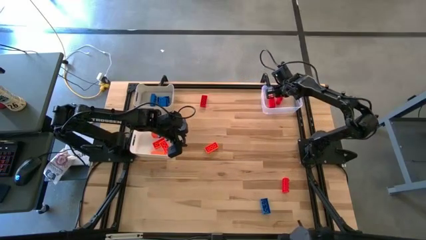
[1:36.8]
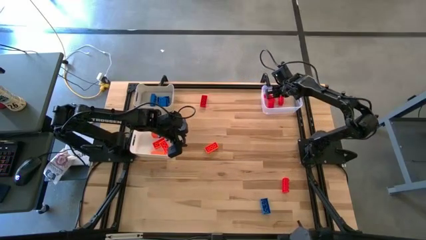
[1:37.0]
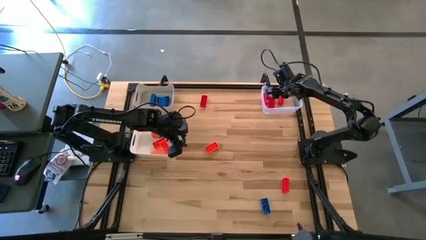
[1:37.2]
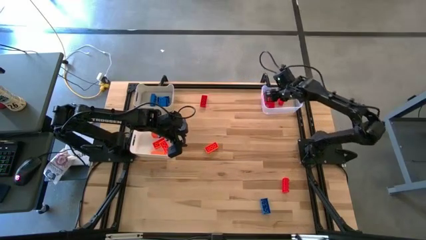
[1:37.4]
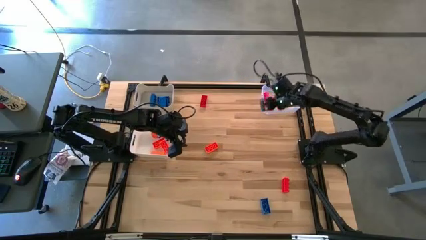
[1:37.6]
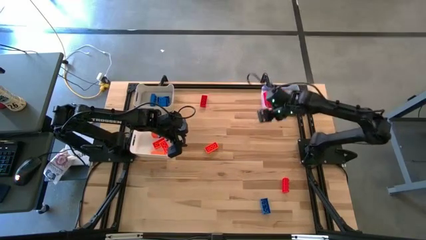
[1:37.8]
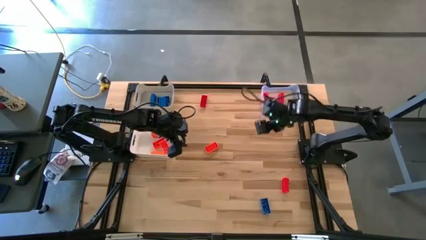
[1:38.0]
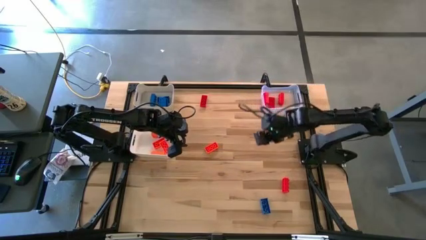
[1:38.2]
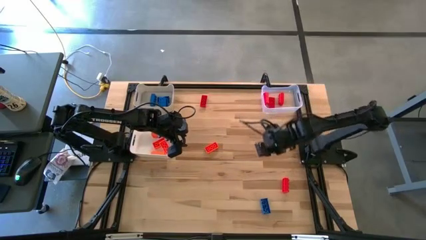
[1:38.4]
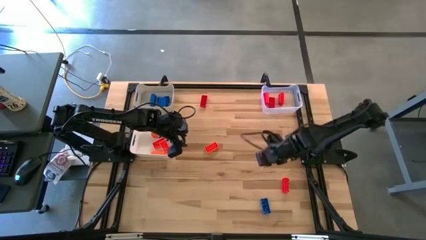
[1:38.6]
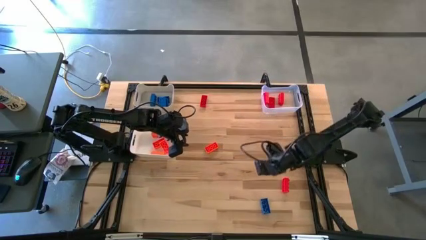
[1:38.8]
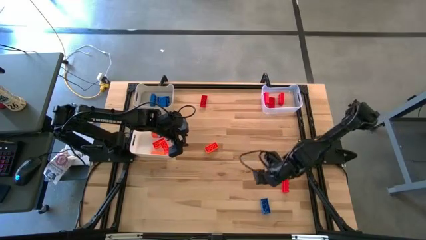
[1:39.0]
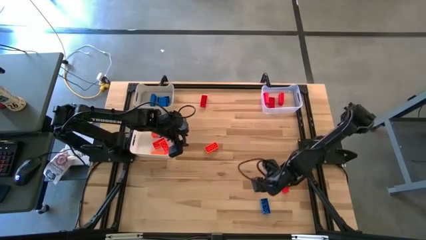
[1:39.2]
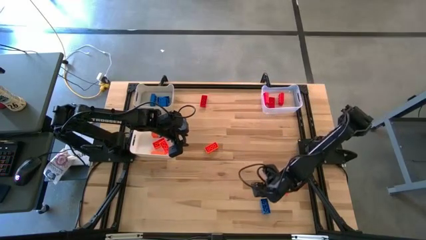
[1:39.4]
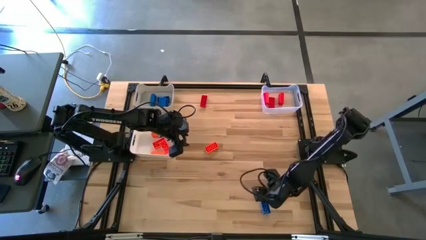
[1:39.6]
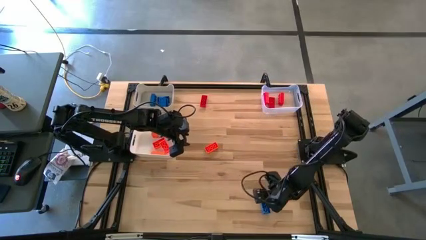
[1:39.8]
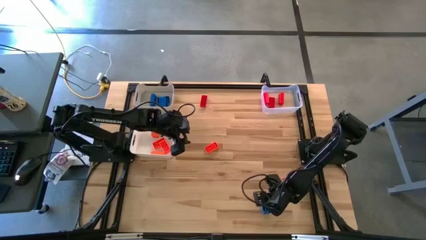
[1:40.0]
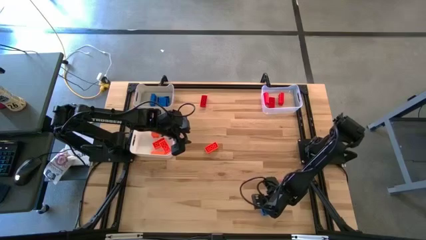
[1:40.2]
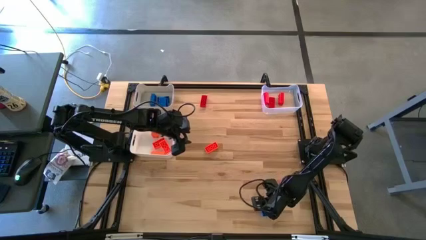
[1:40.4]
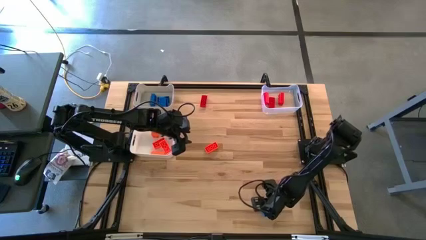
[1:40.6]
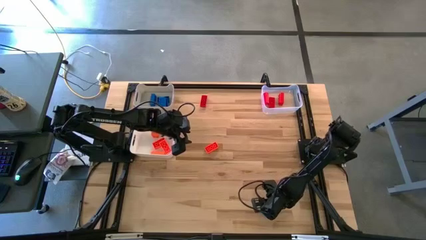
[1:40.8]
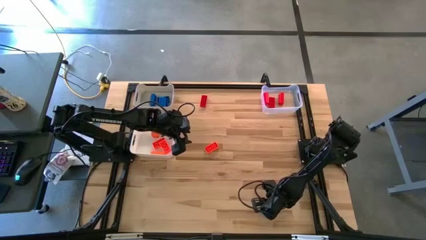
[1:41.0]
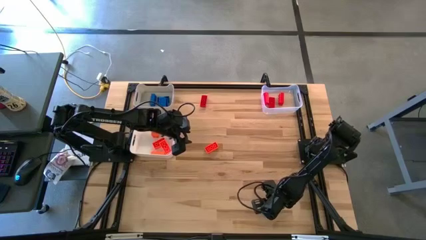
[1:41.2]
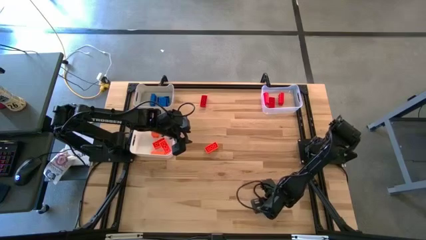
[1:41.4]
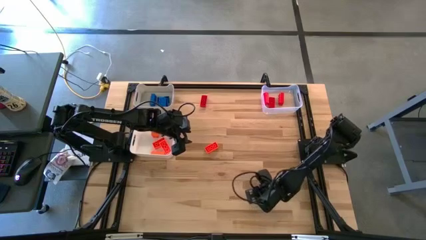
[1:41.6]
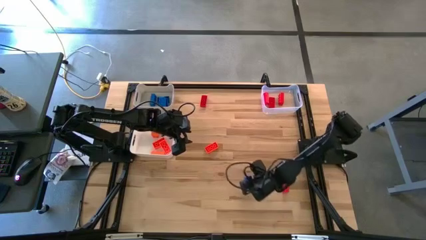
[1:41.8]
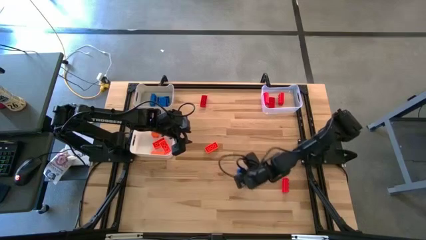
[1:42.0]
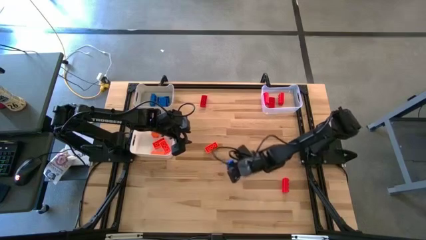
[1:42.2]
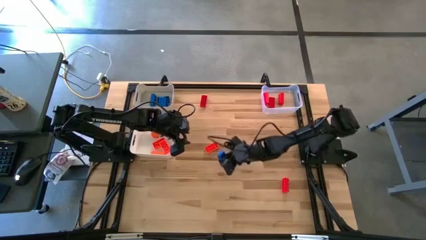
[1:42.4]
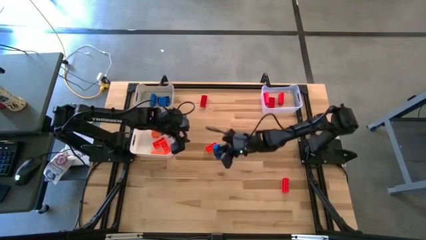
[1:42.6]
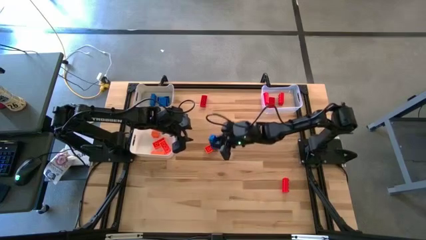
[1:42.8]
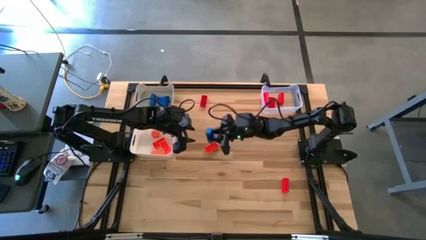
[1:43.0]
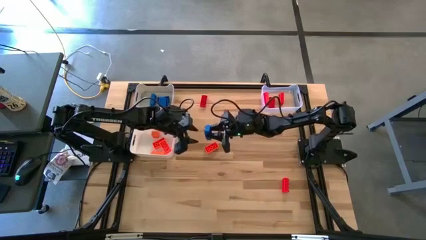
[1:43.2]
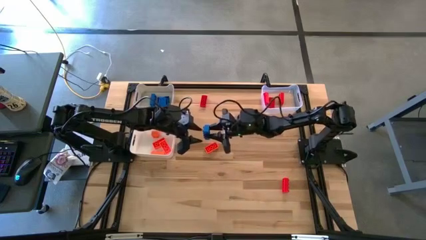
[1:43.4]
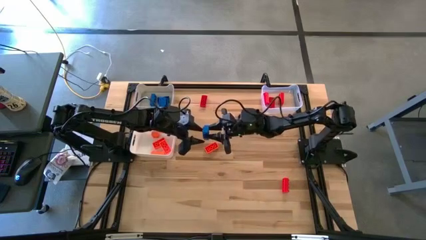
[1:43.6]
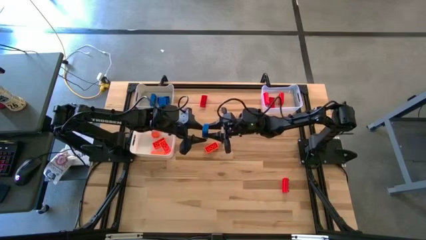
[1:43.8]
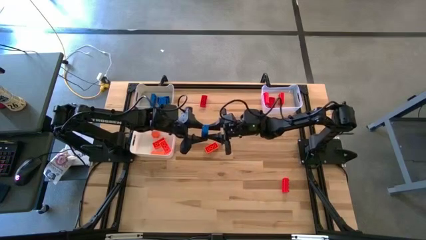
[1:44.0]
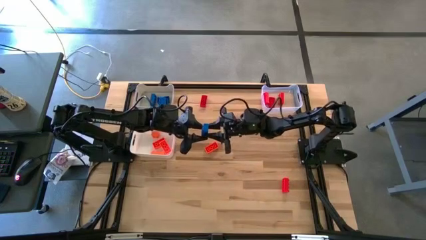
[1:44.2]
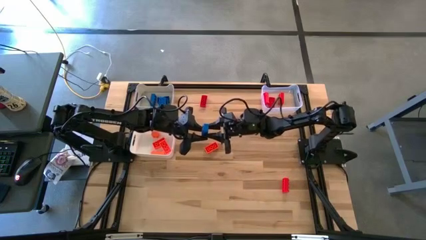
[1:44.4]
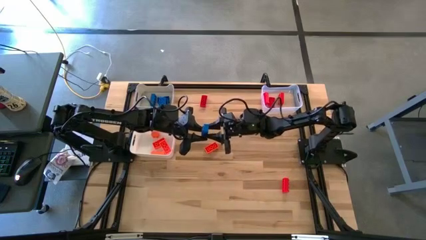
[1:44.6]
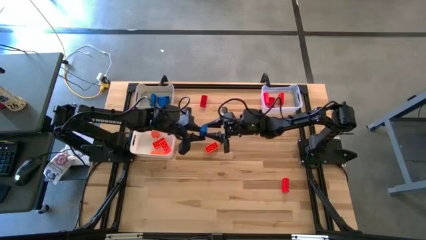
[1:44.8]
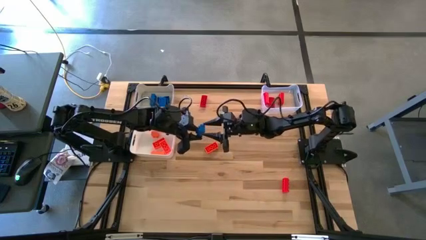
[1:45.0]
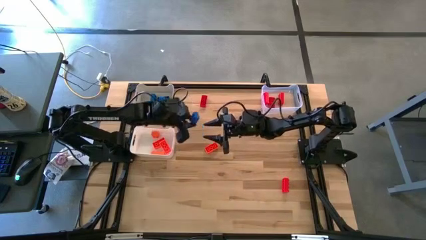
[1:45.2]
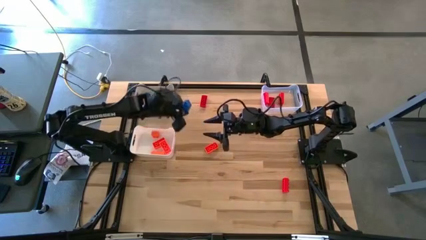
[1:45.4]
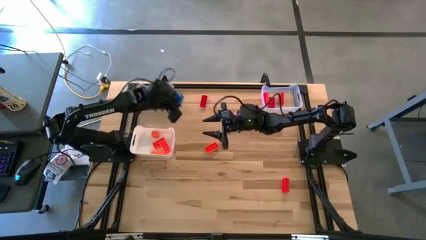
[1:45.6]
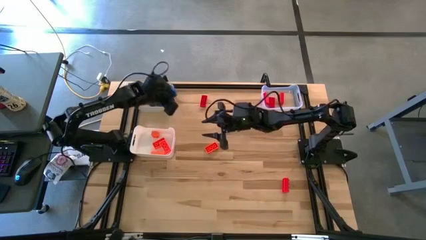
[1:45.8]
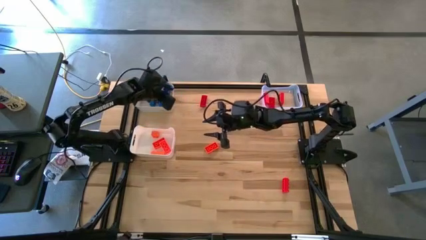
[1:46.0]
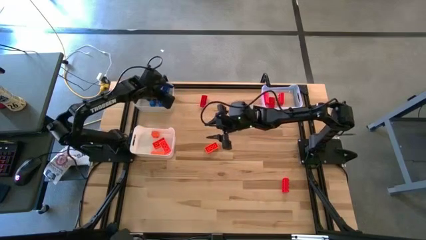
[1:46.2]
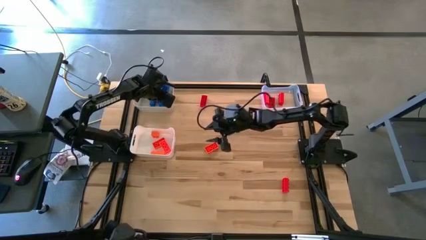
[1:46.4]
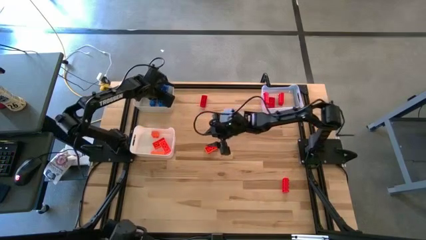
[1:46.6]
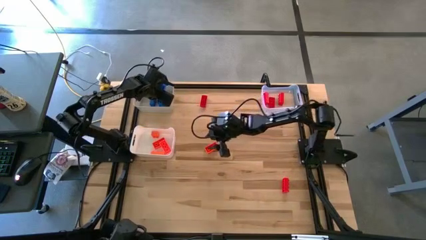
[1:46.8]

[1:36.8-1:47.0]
Task: Sort & place blocks by color
Put the blue game piece into the gray bin

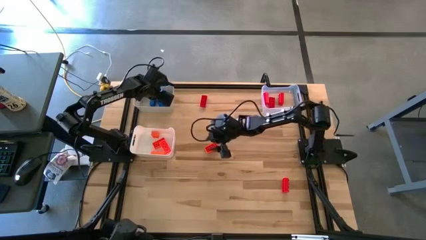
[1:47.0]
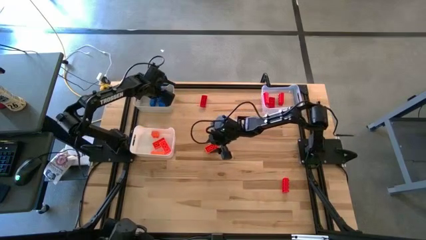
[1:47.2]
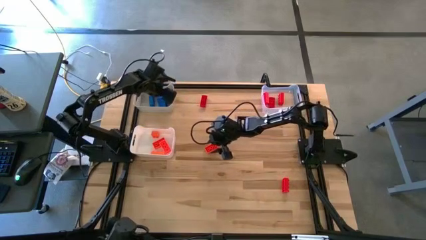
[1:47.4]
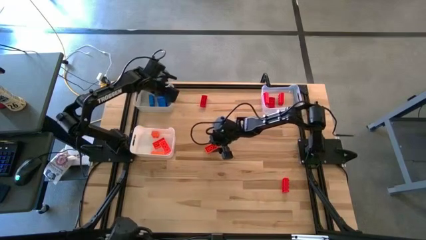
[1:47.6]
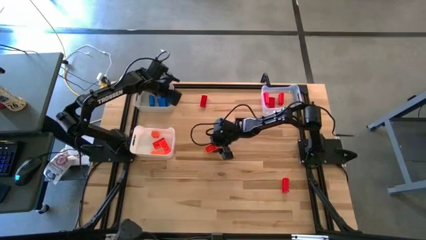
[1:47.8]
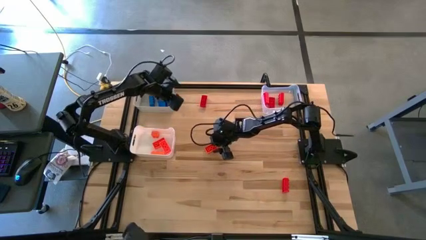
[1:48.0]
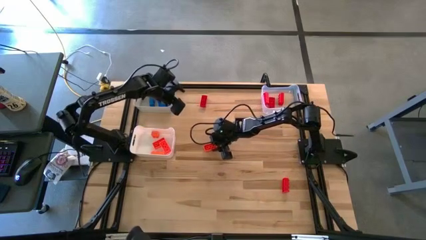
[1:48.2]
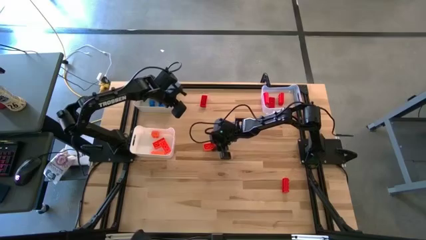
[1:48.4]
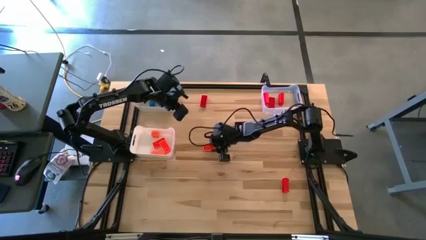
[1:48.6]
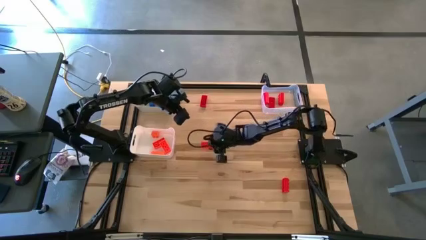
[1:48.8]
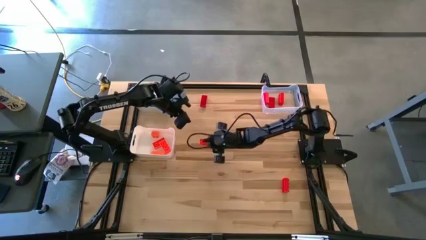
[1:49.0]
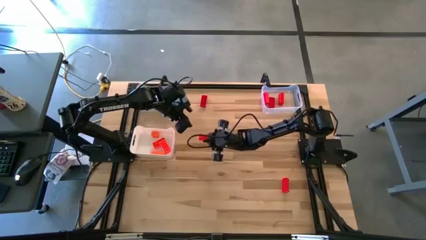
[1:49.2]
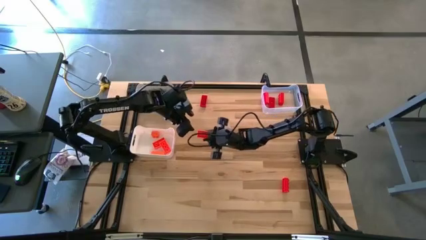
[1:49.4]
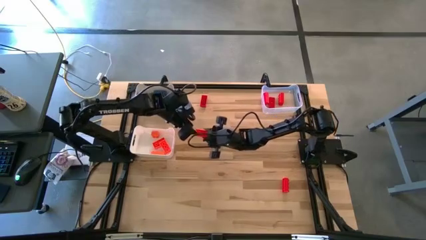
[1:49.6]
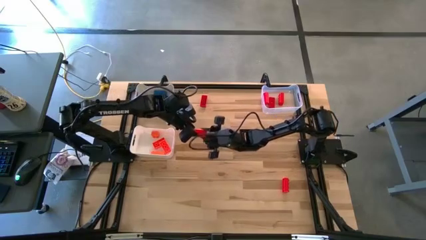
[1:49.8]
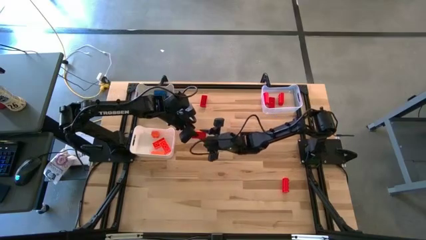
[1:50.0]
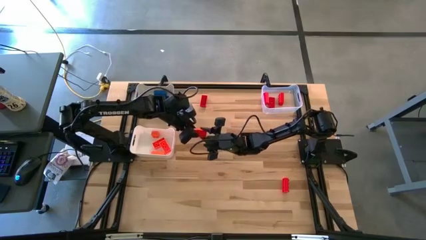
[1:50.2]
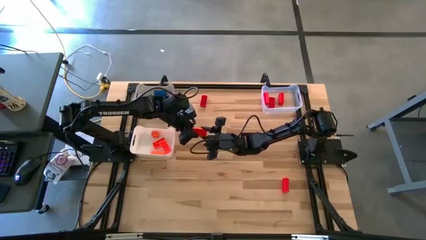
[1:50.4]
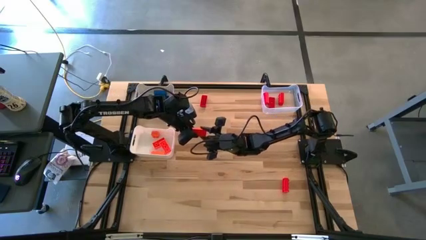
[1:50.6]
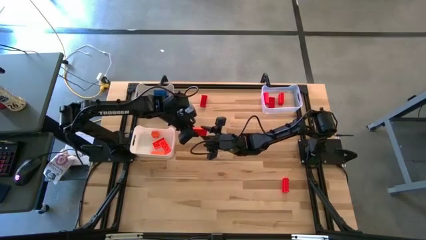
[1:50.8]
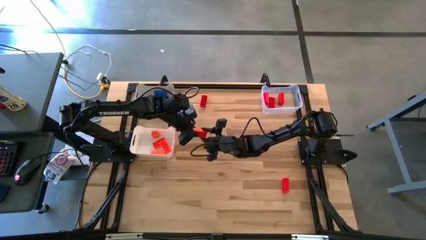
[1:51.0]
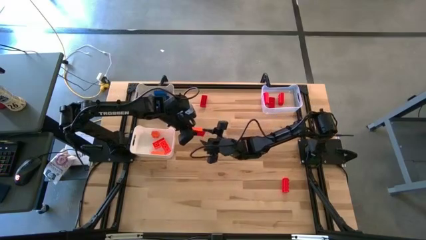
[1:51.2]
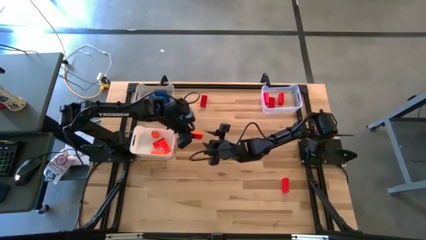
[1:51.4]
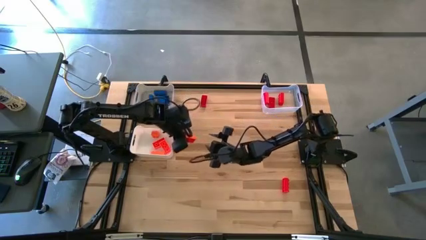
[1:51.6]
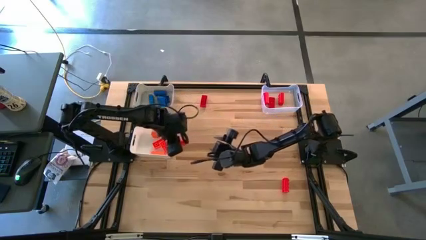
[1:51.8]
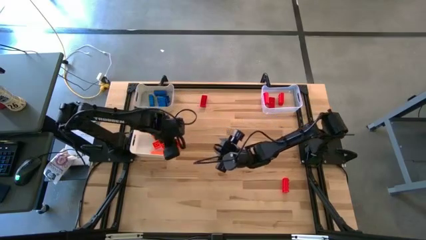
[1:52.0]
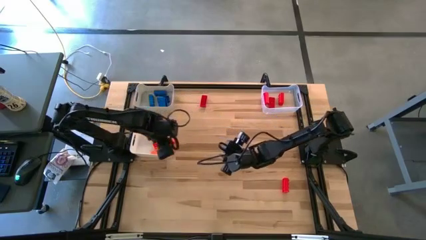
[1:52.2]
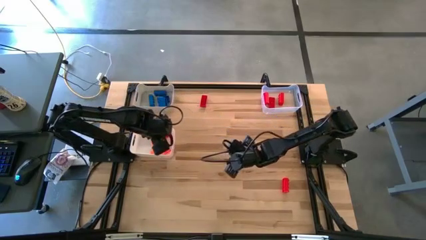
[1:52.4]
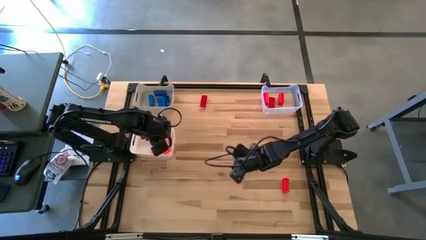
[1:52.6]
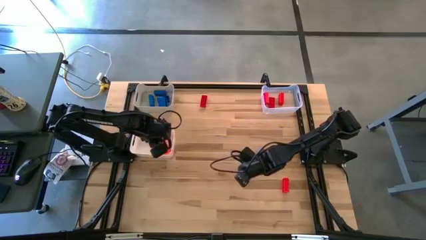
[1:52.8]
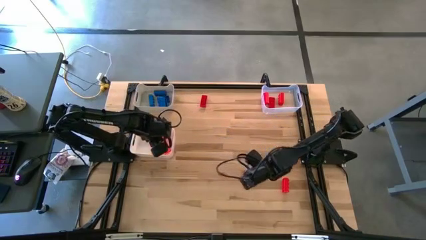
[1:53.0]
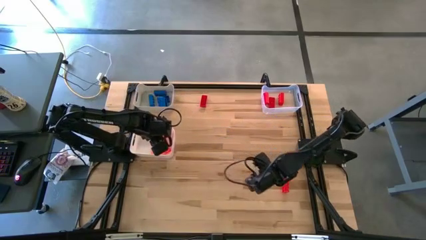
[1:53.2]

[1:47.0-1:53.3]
Put the orange game piece into the white bin
